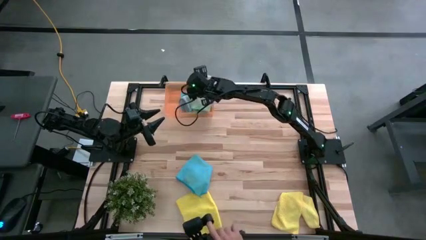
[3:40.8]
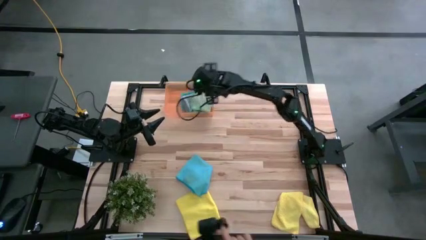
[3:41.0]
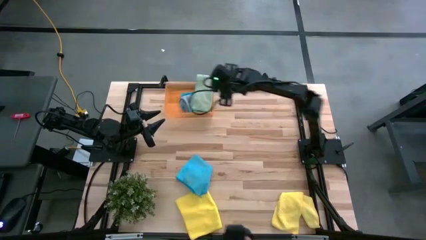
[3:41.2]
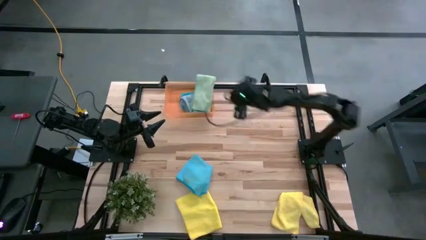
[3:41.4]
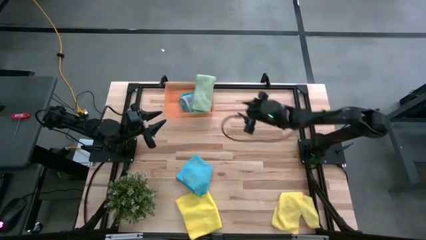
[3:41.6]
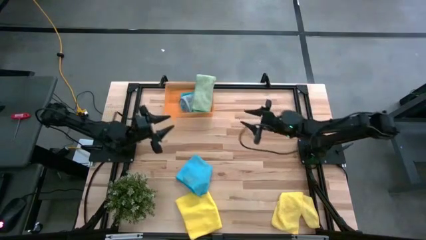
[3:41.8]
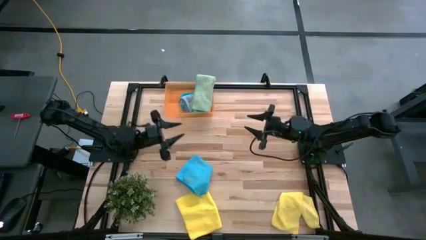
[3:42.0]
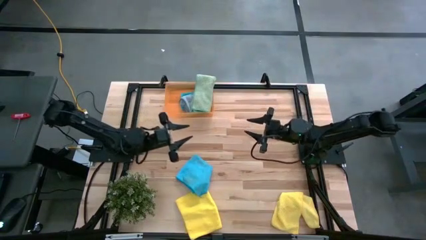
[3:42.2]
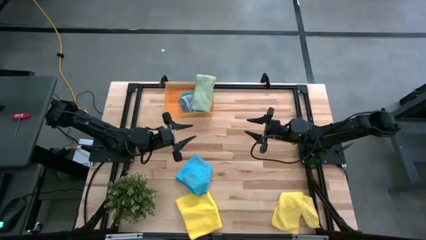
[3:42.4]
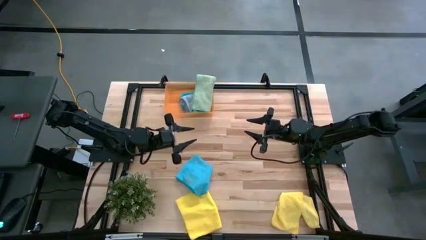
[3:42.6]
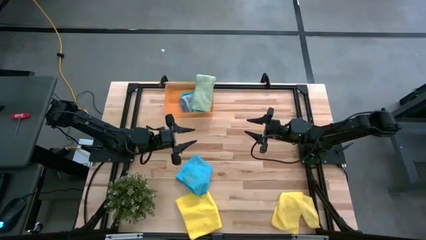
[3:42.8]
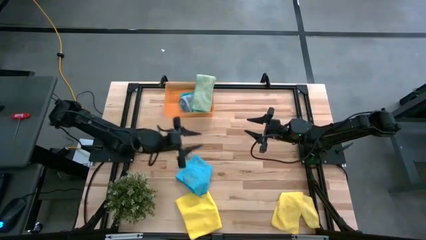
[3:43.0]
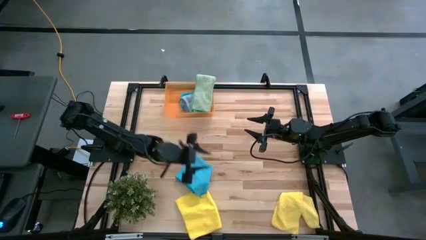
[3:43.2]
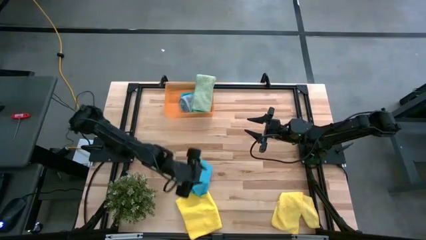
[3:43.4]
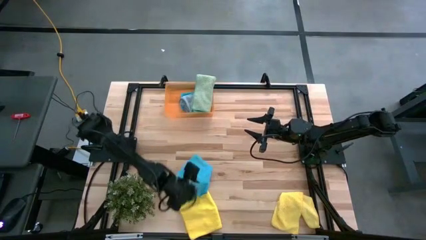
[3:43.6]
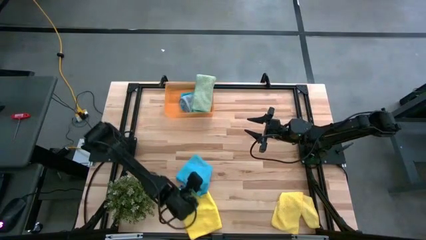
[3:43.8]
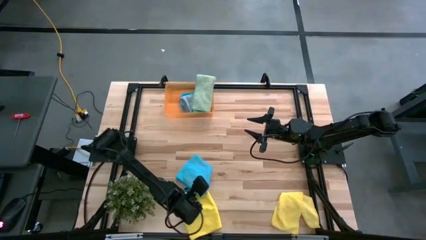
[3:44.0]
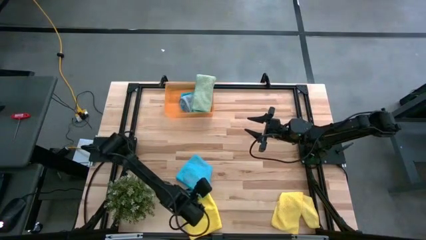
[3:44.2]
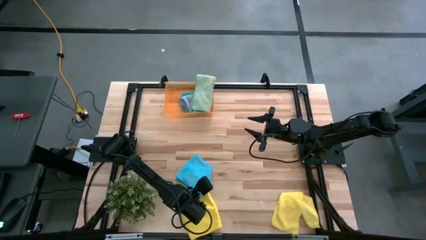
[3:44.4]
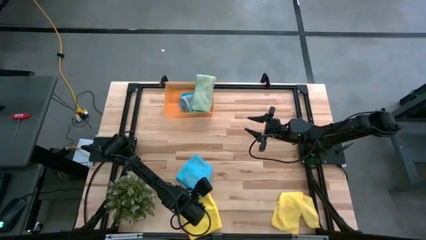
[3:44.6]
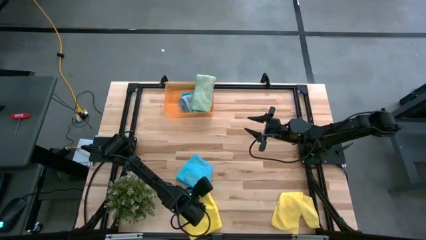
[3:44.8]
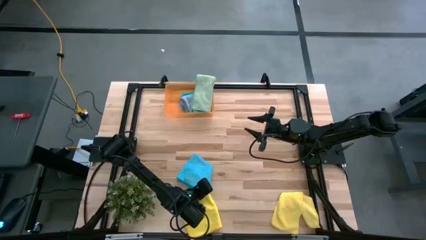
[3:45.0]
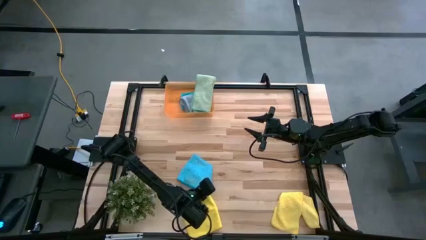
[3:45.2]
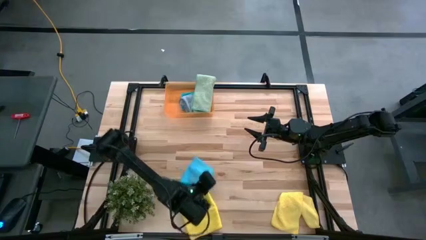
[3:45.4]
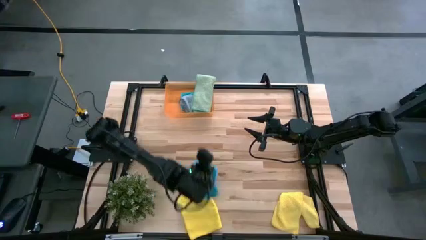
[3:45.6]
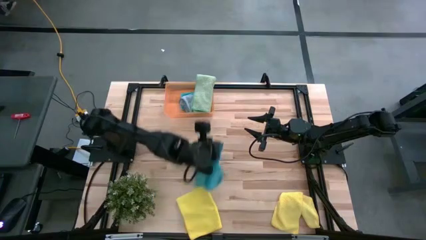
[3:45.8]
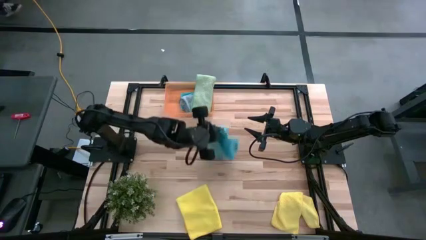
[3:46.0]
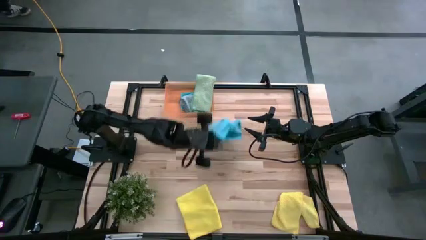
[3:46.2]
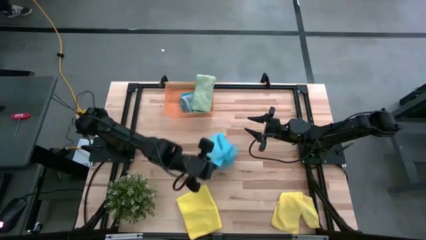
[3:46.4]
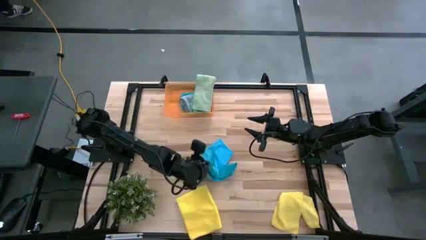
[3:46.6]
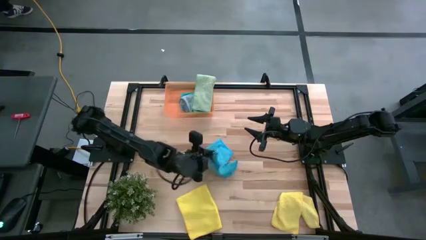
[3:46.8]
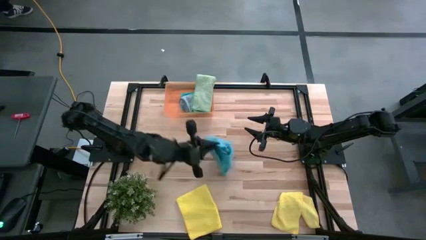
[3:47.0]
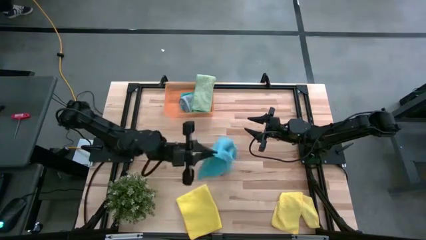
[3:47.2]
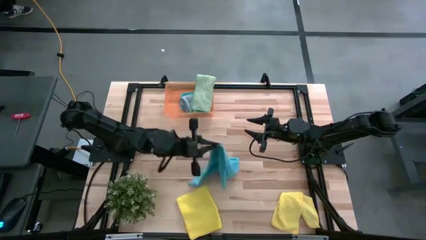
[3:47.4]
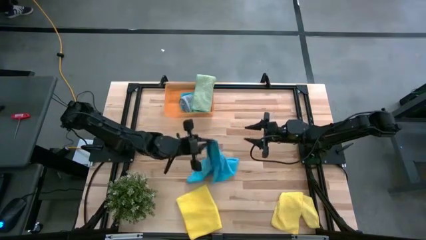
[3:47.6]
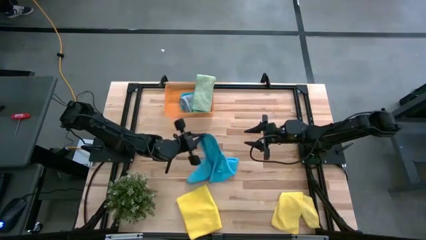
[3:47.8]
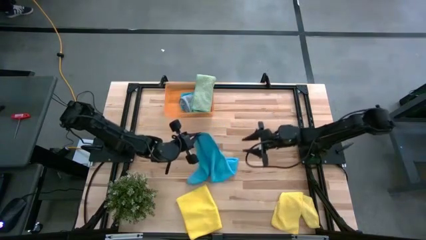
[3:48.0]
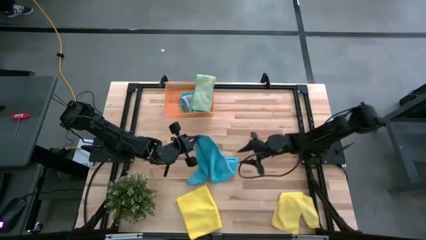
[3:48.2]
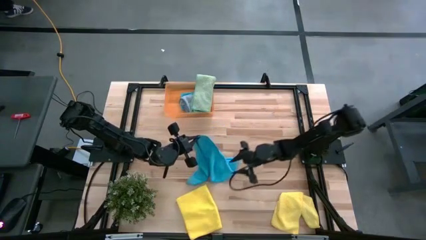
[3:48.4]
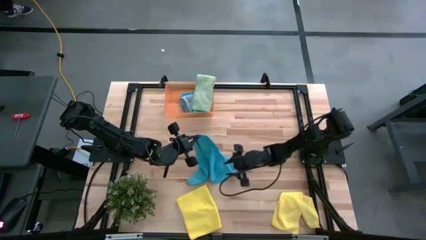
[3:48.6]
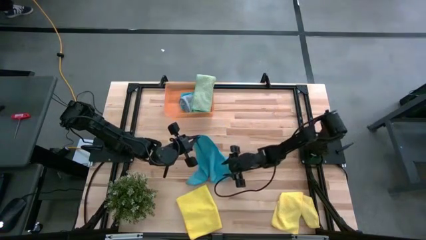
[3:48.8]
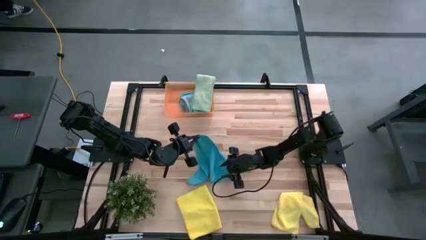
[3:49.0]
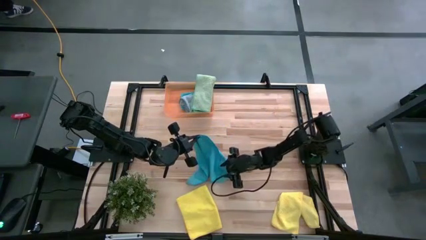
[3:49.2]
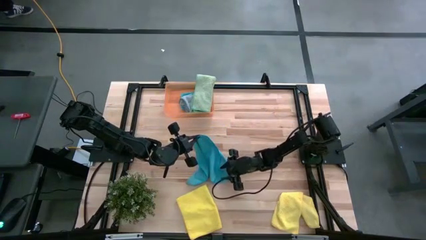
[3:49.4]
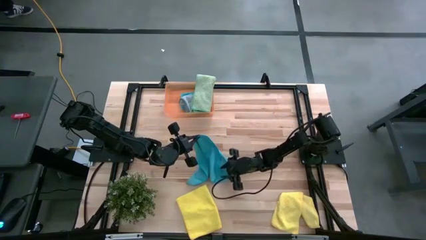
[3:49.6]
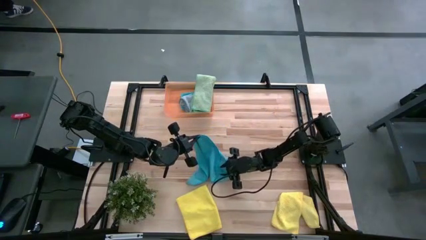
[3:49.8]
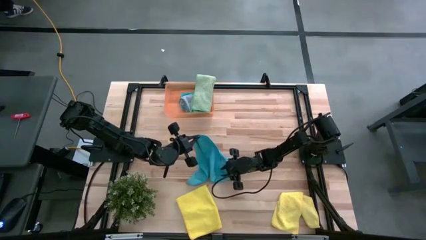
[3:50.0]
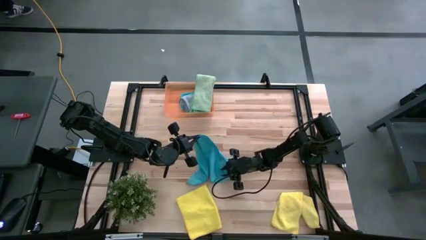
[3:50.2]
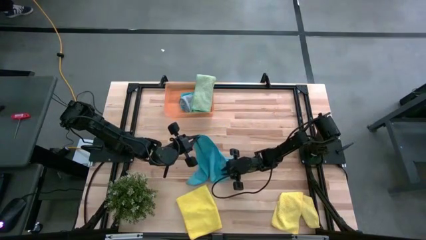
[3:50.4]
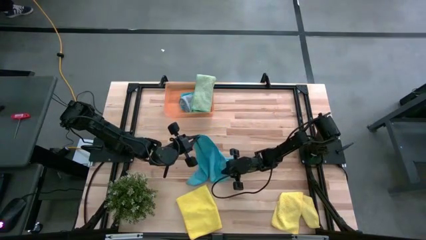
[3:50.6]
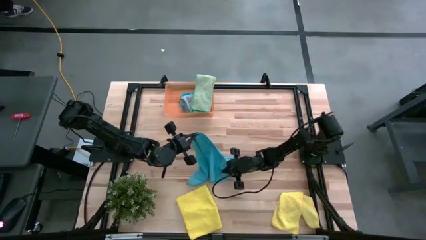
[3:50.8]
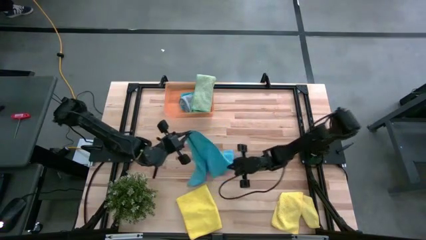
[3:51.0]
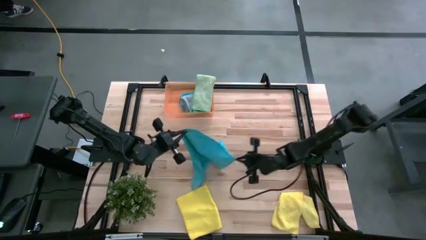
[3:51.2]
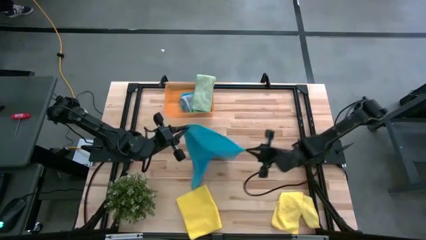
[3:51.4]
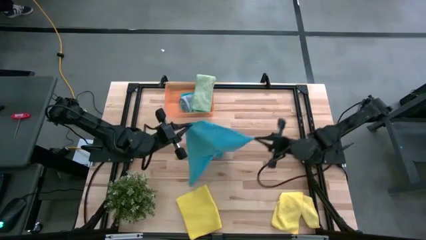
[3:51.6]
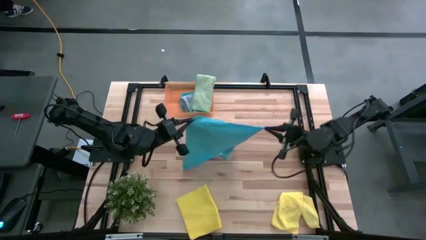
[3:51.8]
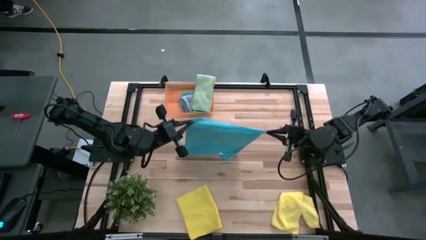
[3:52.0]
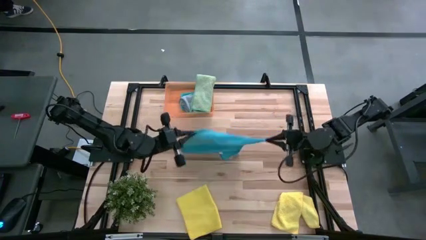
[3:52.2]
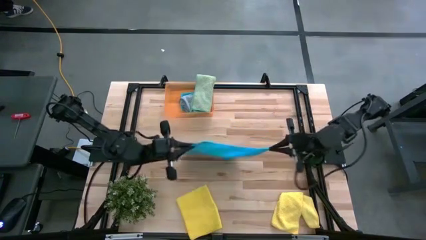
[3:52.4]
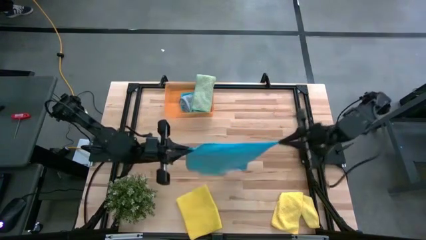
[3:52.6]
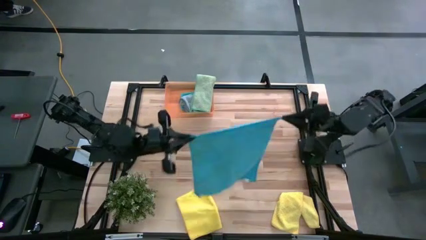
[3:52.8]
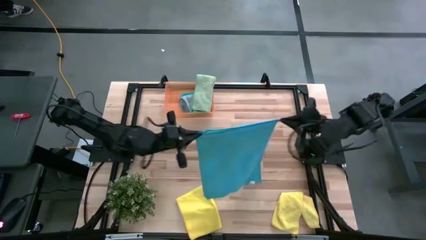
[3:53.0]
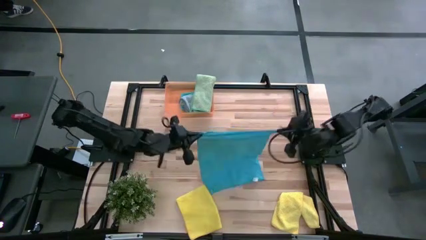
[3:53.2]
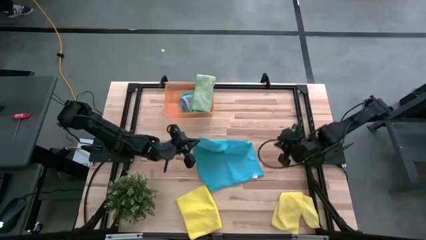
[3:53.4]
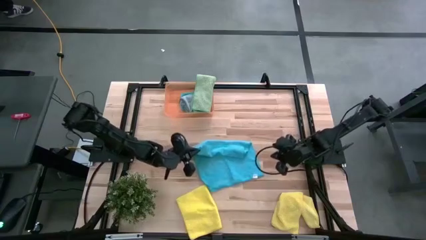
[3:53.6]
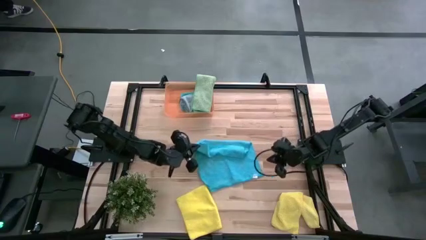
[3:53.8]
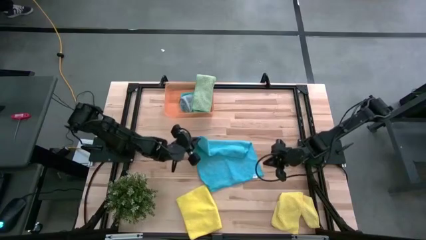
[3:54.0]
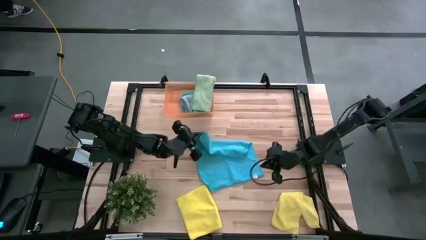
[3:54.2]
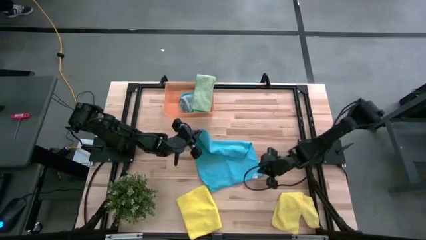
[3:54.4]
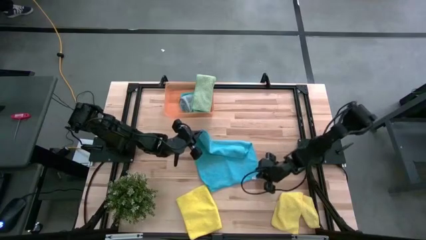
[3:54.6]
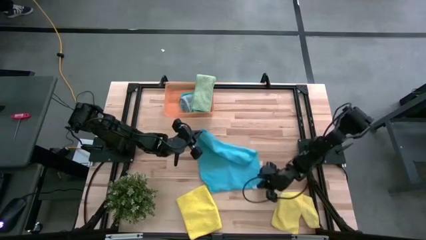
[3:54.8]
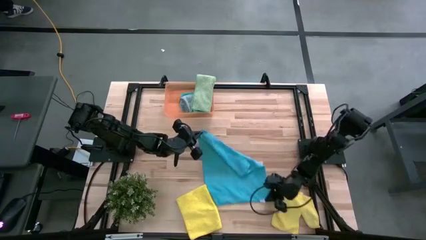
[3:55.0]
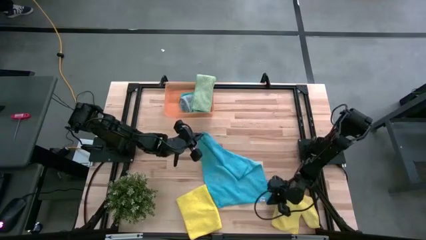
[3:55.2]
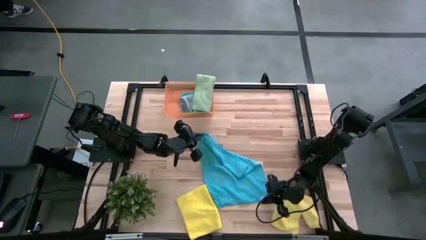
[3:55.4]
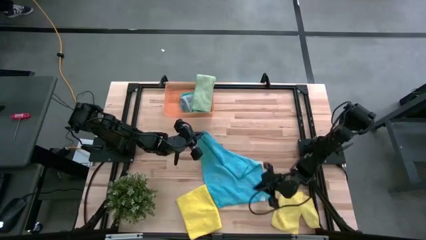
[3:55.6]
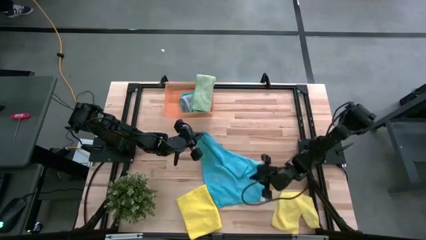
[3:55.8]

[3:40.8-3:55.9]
Task: Fold microfiber towels
Fold the blue microfiber cloth on the table
